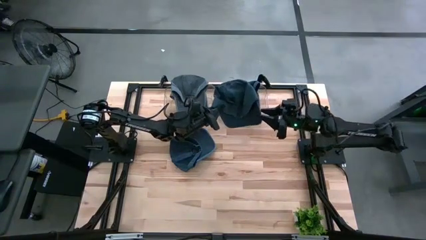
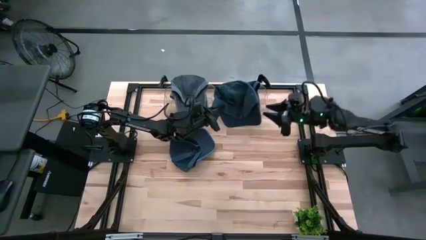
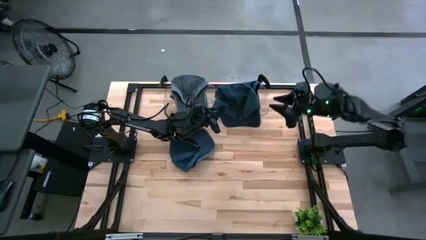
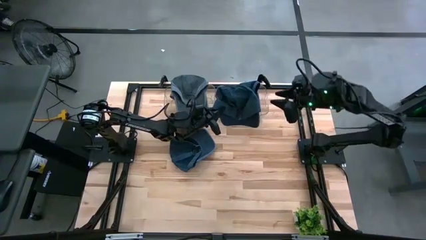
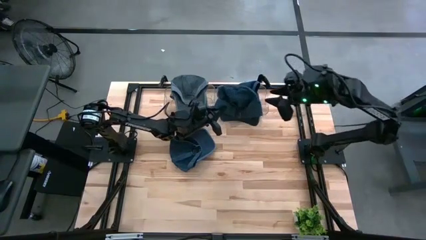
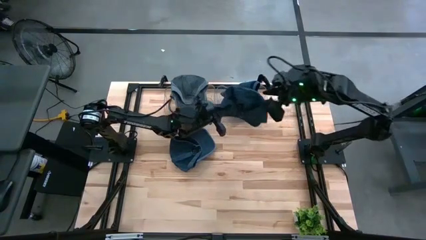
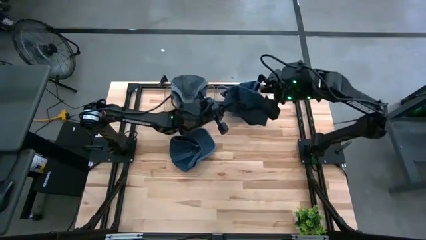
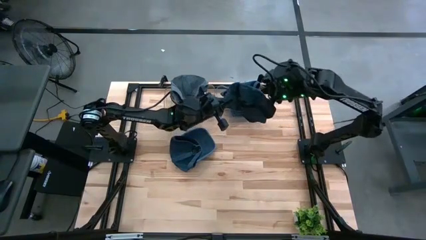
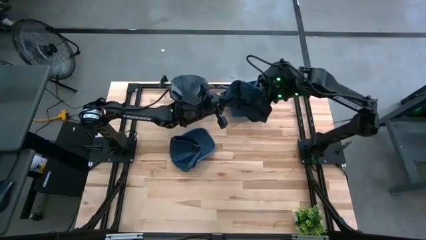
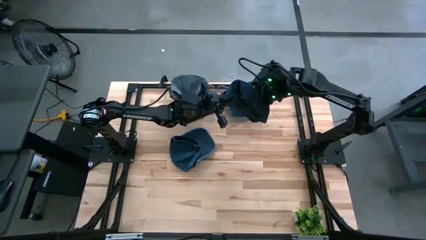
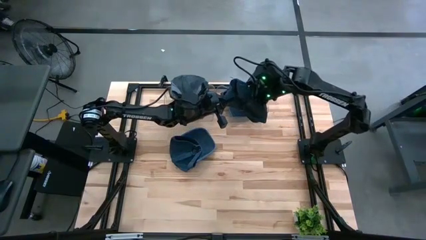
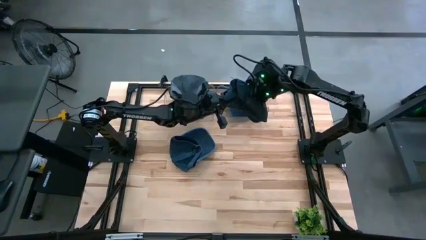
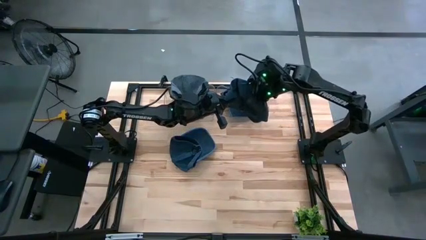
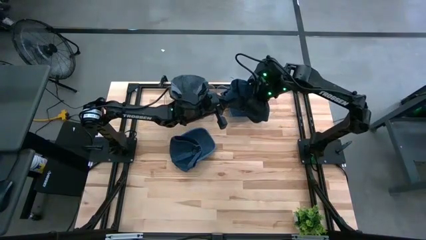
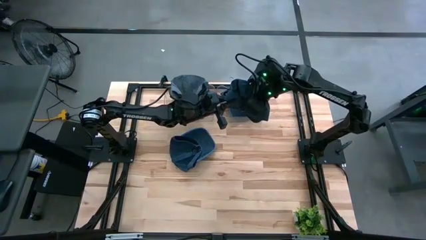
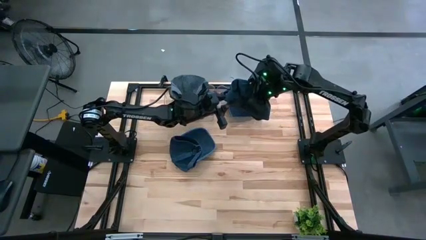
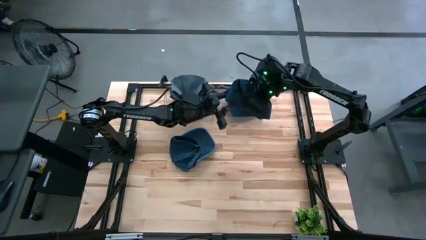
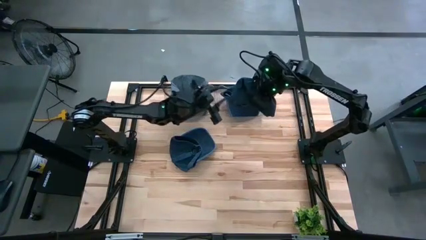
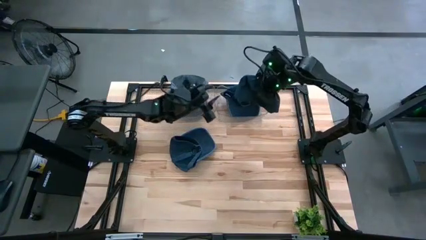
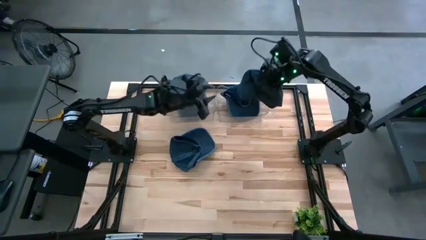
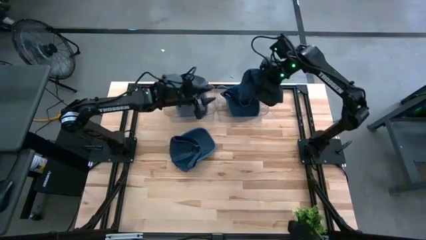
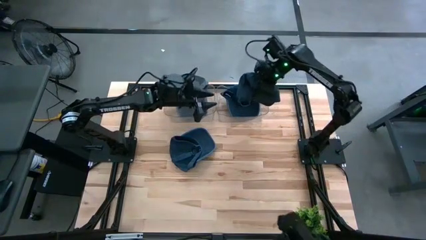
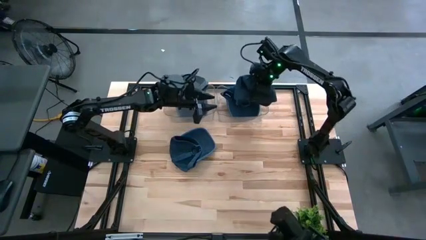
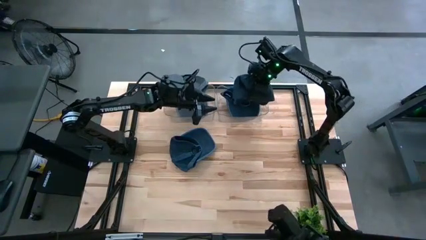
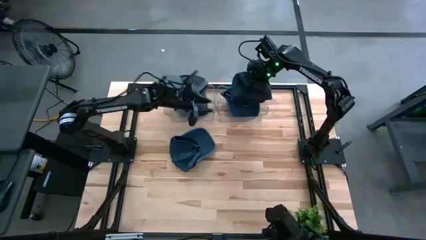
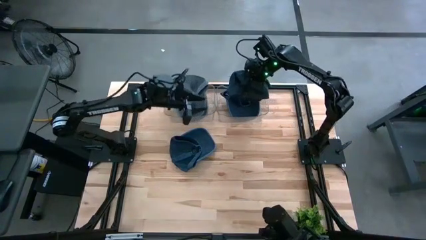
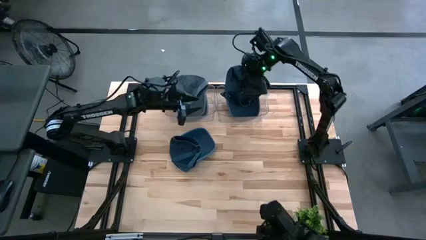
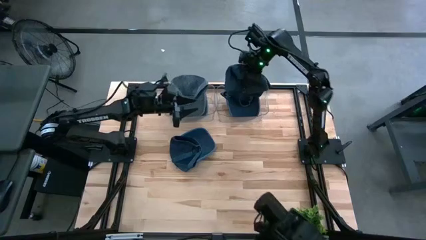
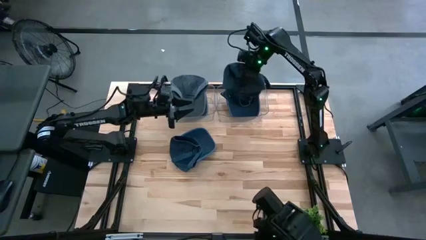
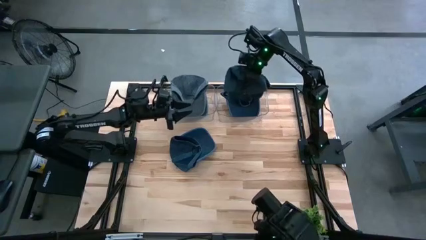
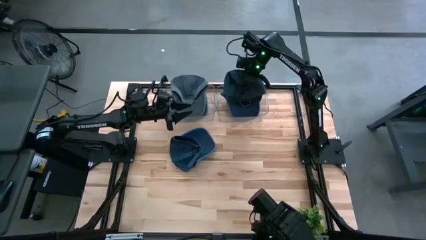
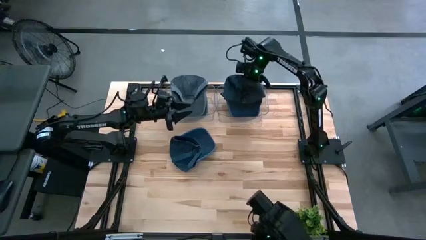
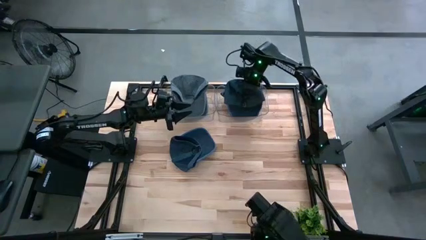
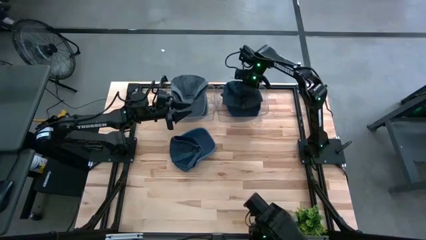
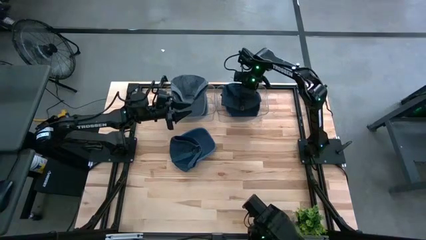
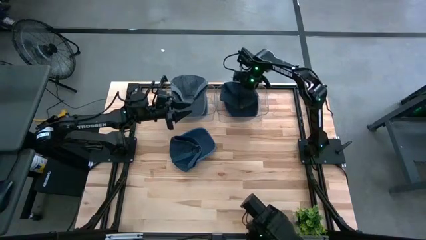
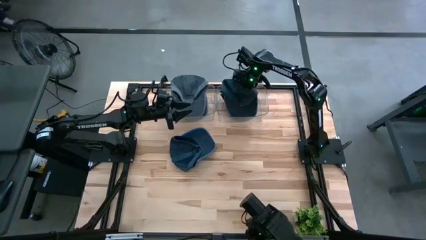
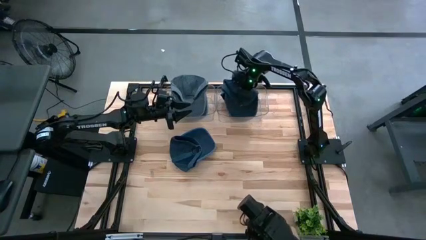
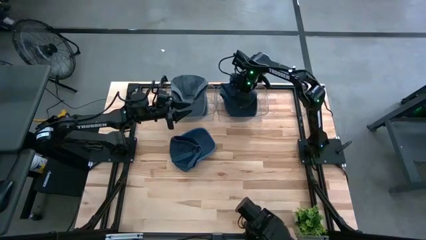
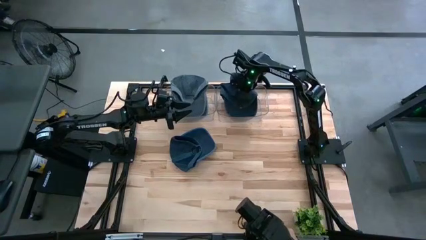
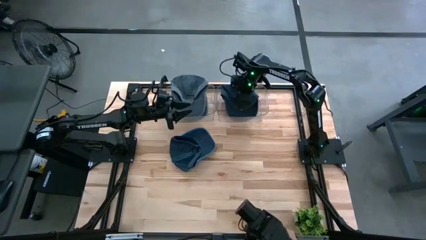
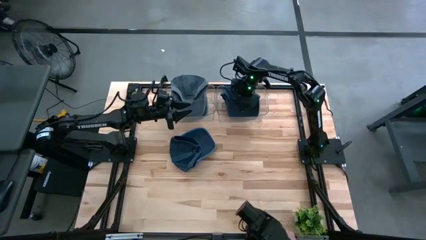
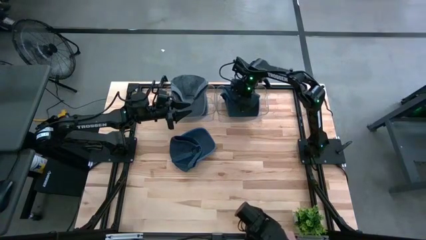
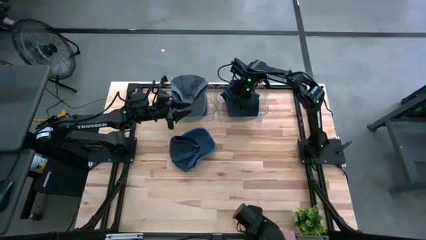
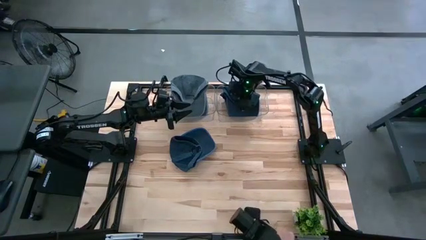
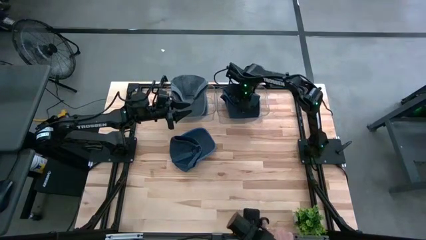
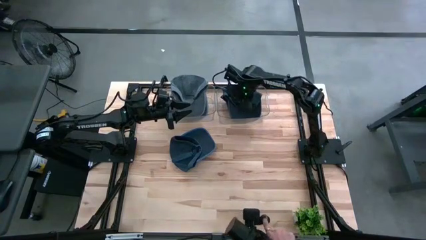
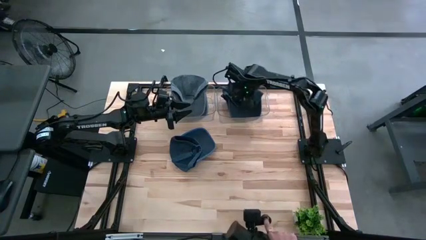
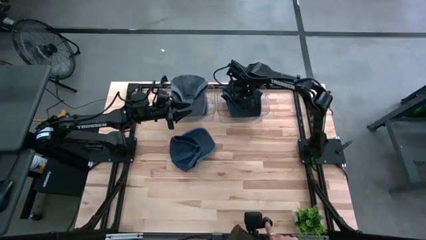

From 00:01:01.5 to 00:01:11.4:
Task: Pick & Place hat
Put the dark blue cap into the right transparent bin

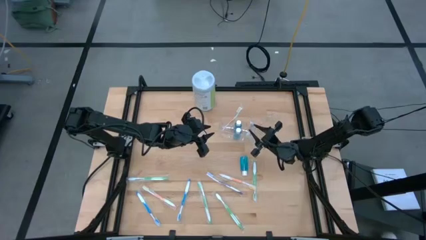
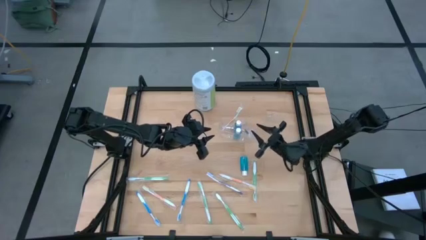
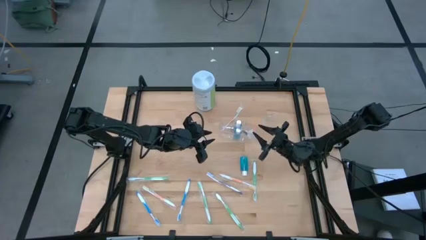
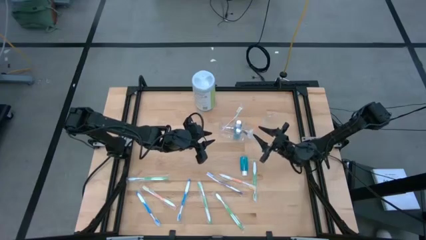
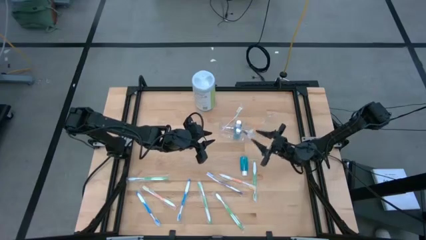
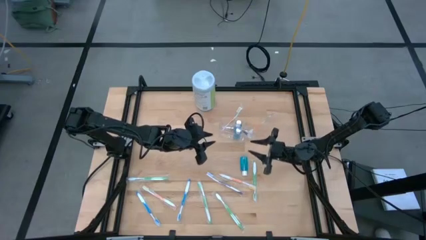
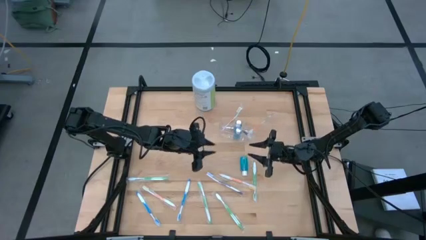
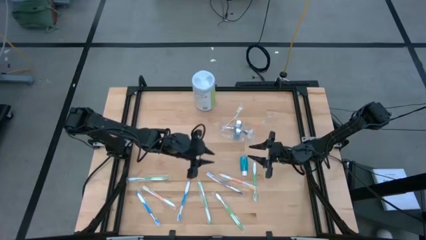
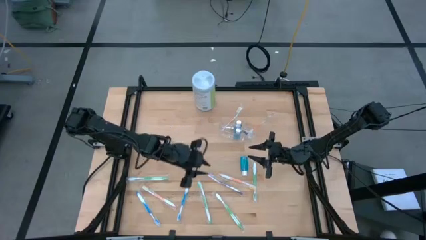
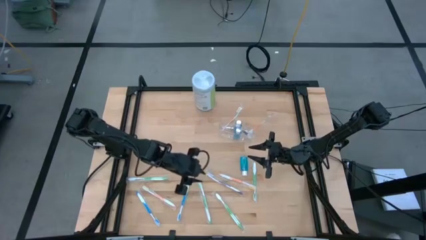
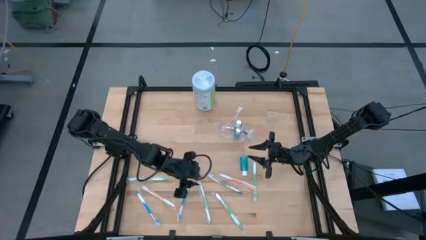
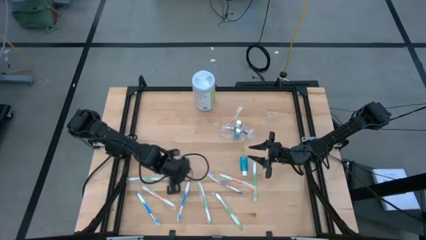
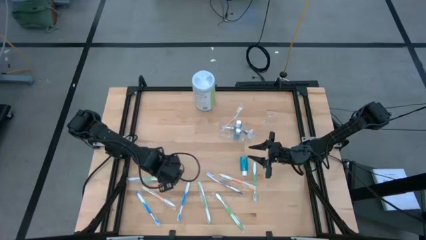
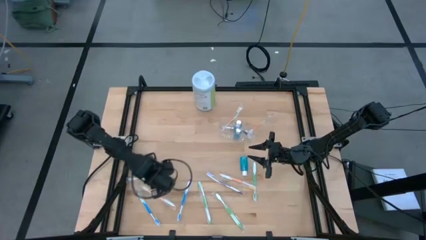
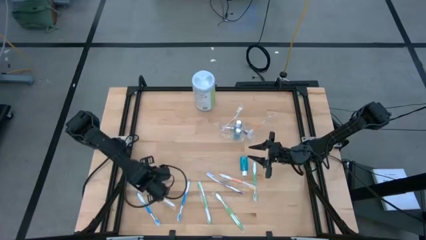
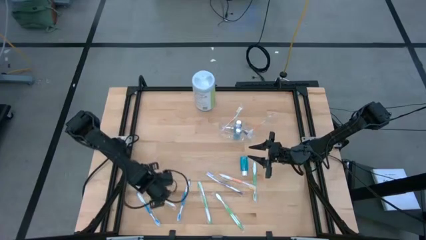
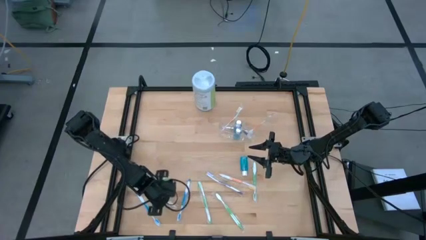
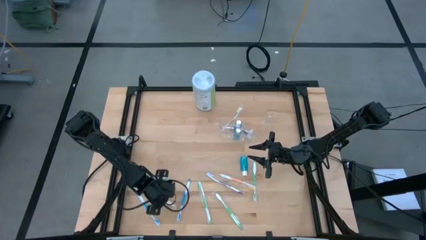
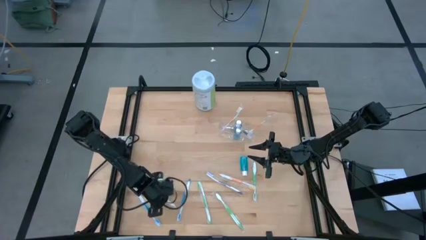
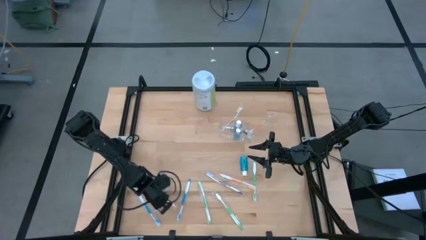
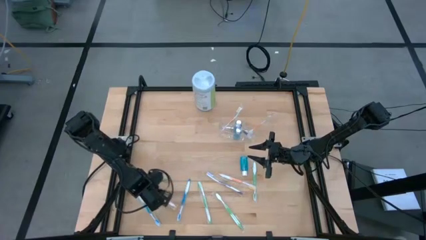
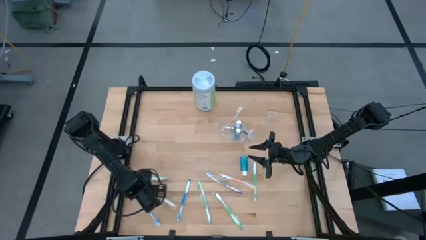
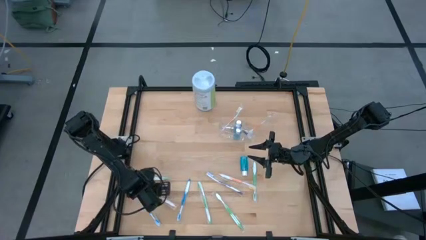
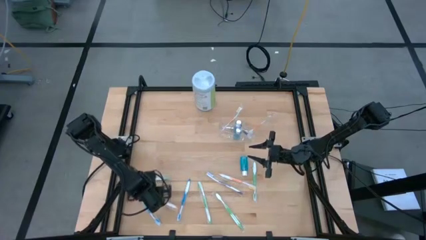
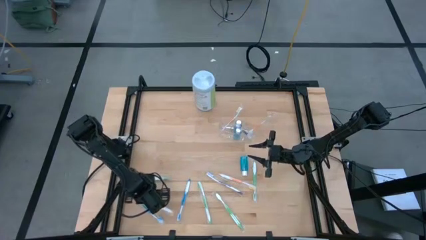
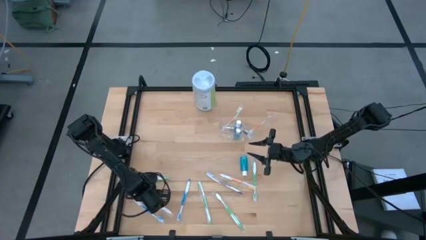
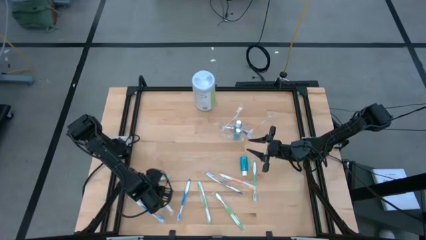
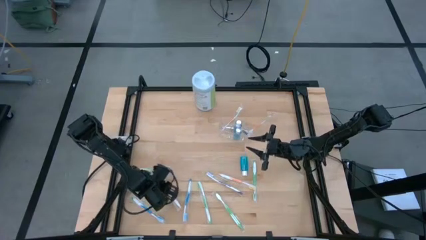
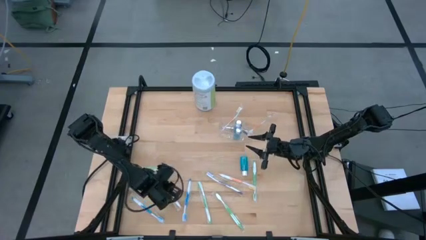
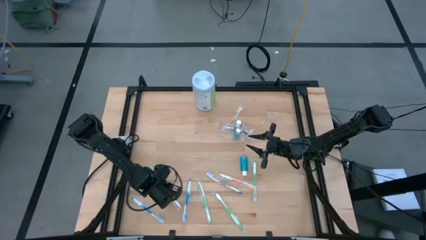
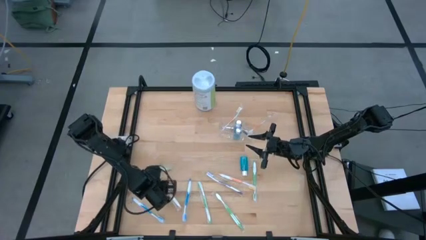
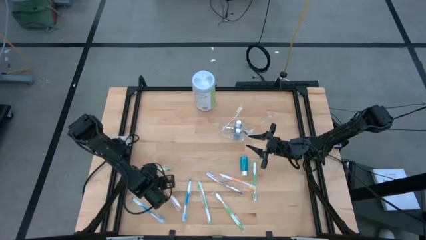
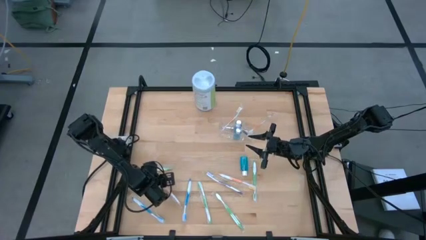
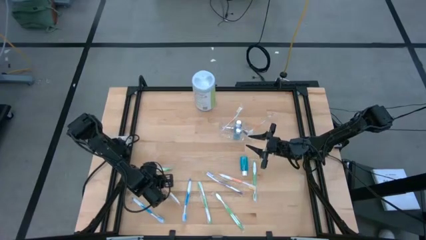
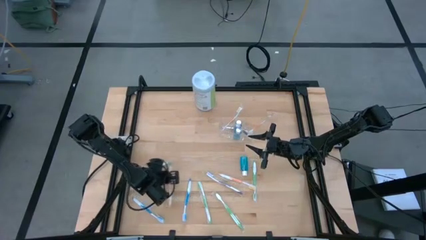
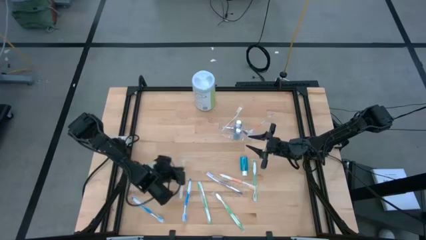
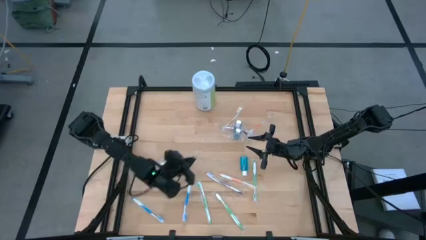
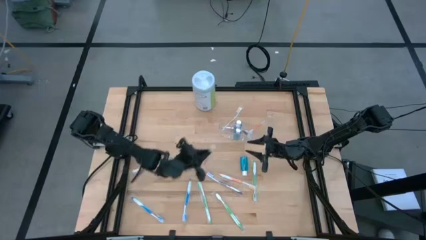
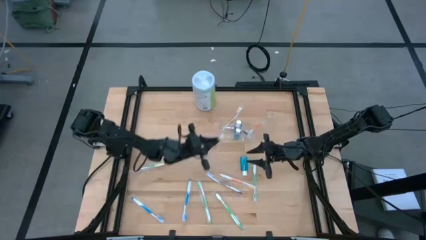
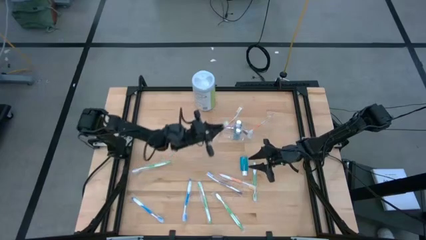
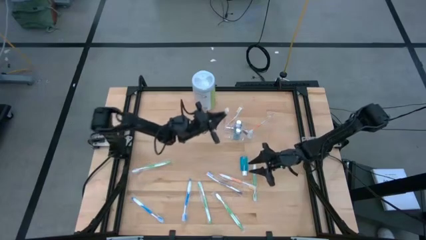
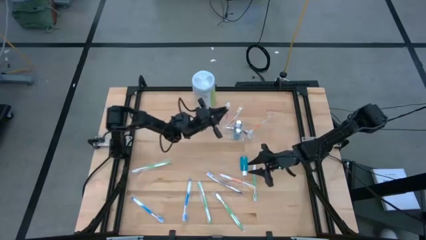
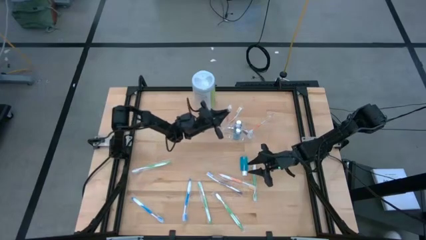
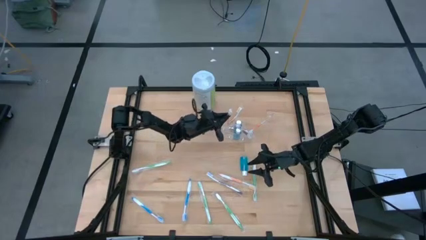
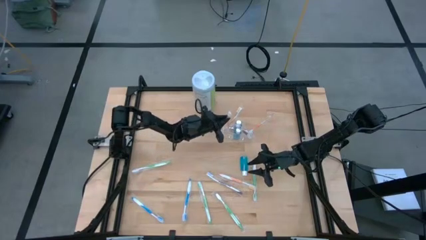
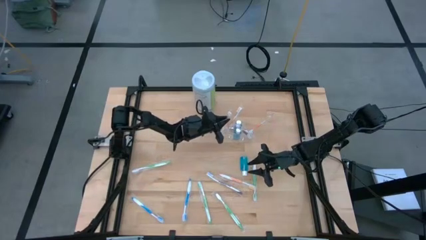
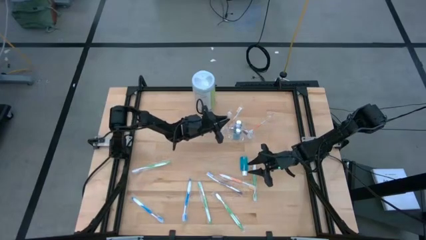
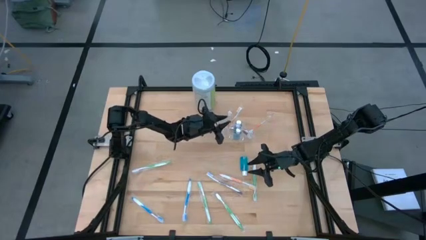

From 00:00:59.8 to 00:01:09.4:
Task: Pick & Place toothbrushing station
Put the orange toothbrush into the transparent organizer
